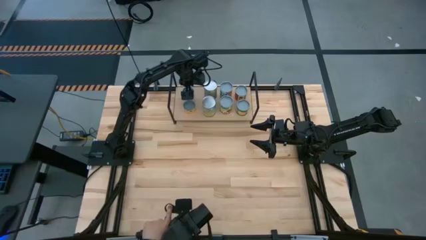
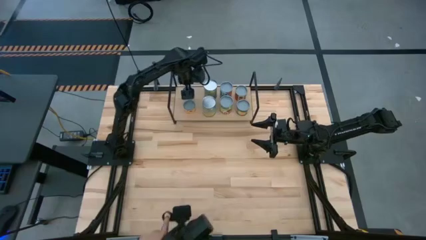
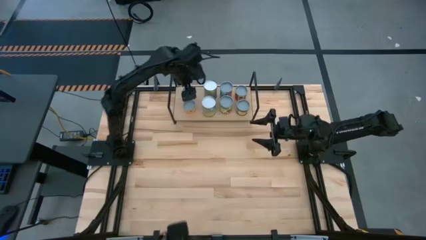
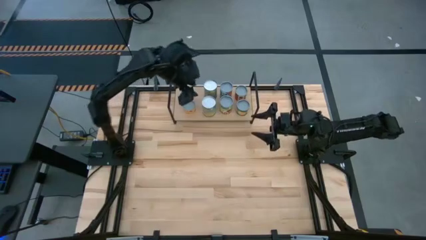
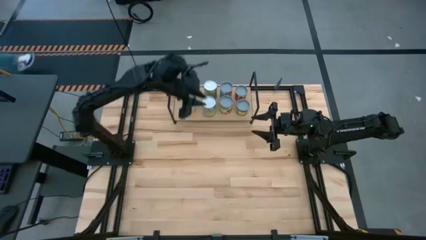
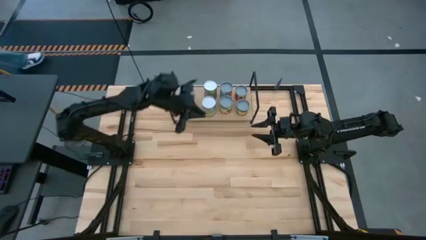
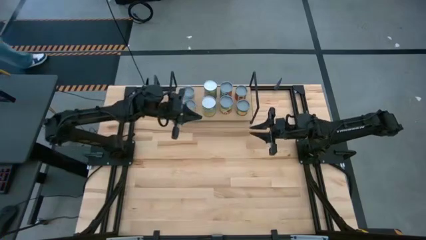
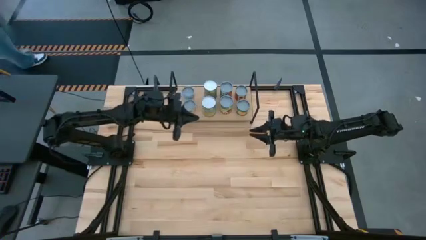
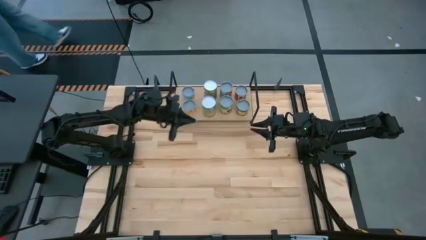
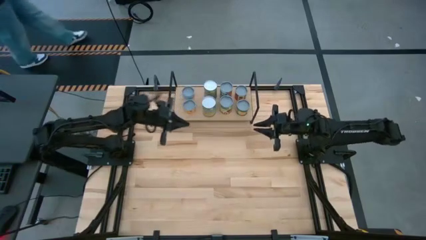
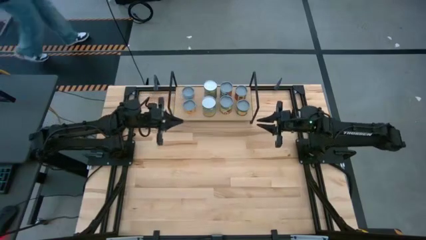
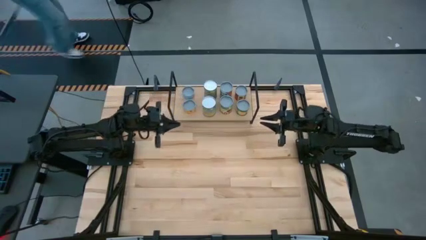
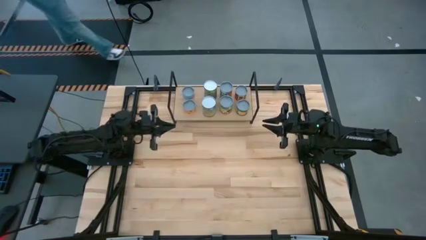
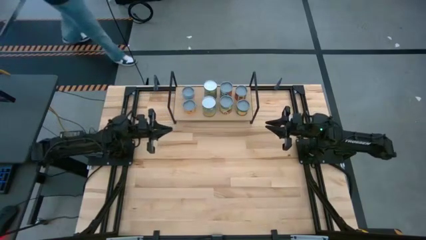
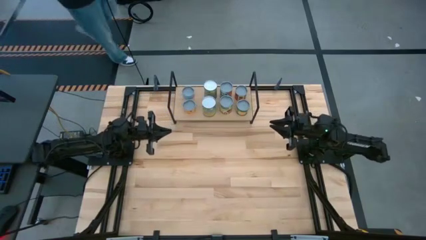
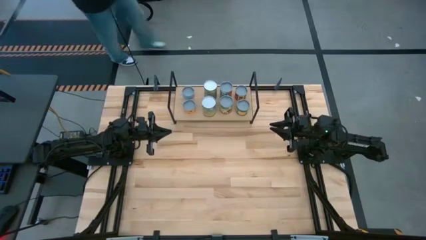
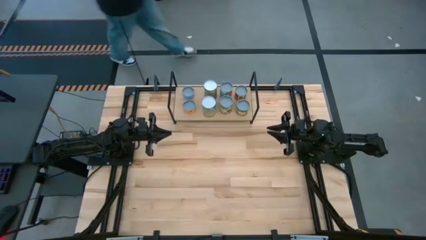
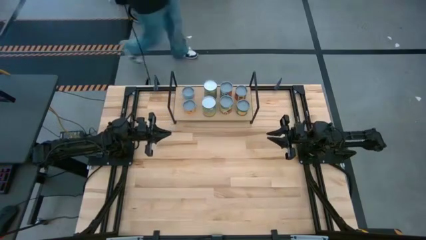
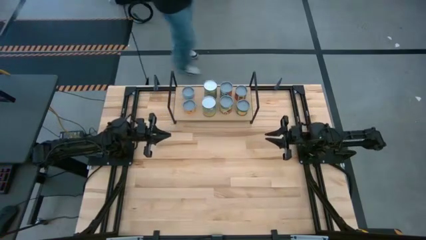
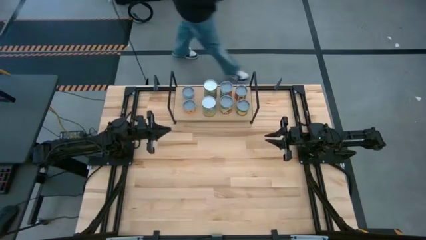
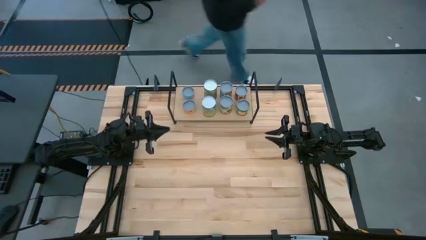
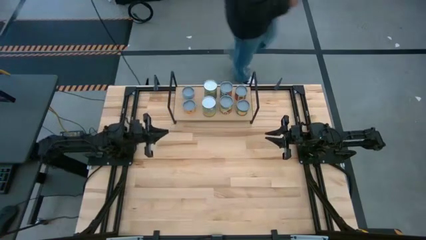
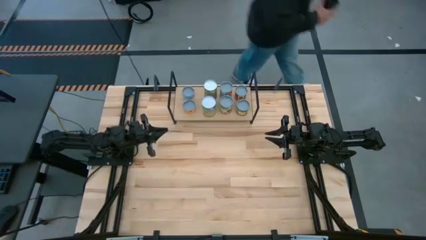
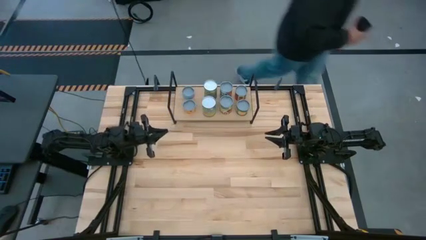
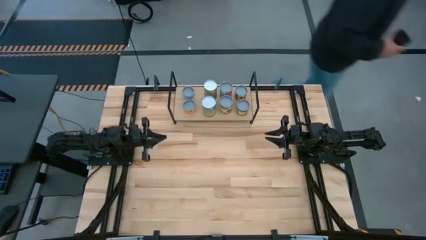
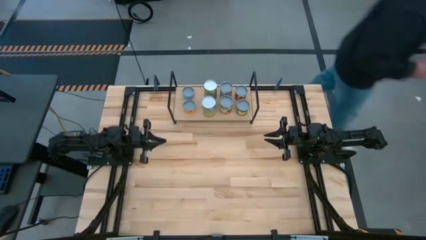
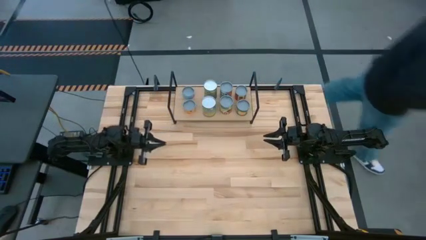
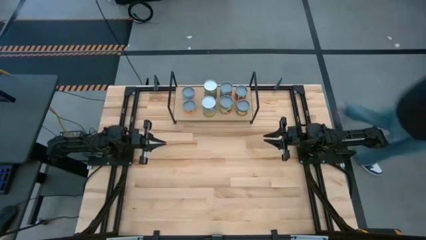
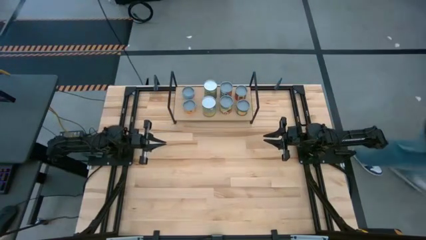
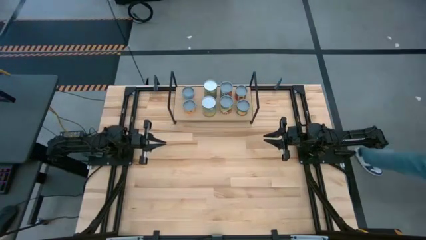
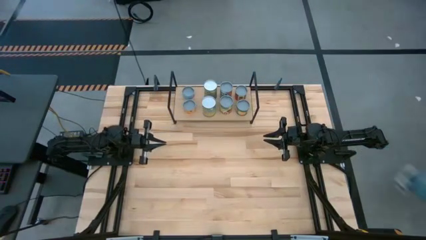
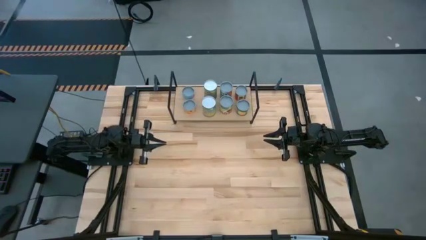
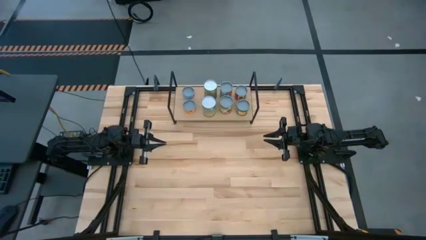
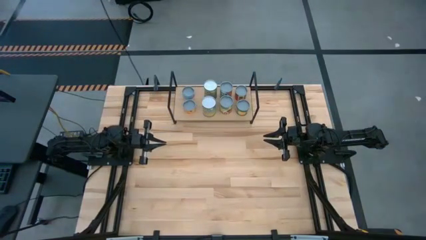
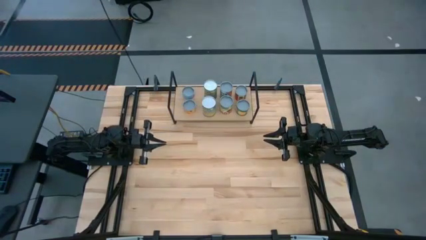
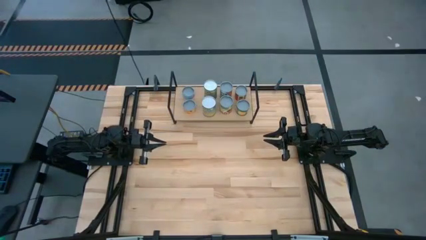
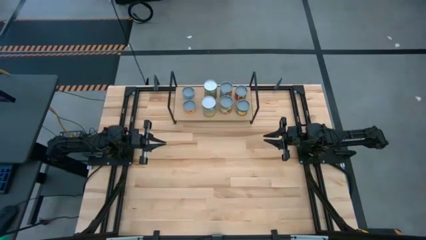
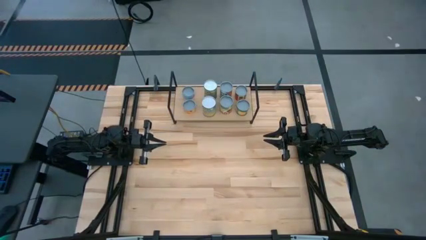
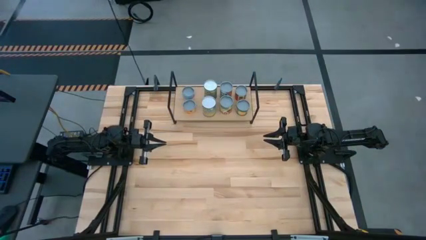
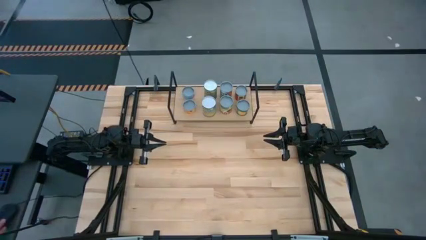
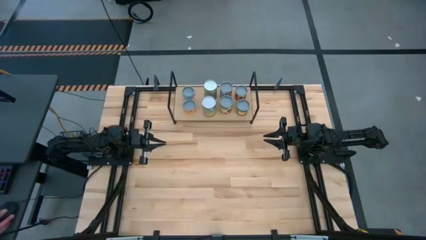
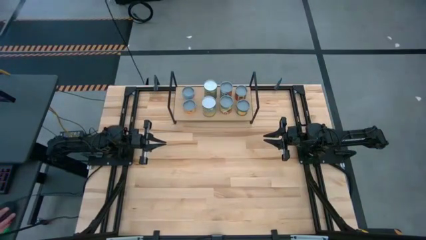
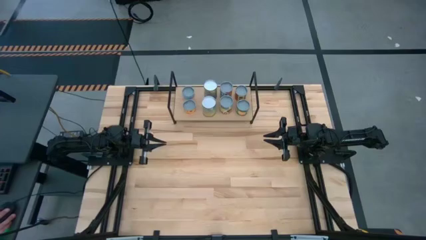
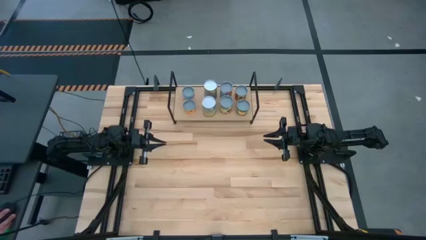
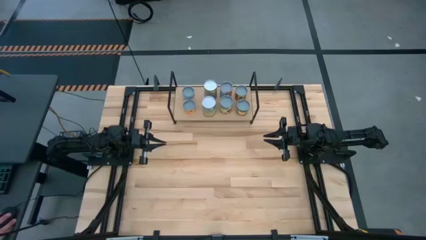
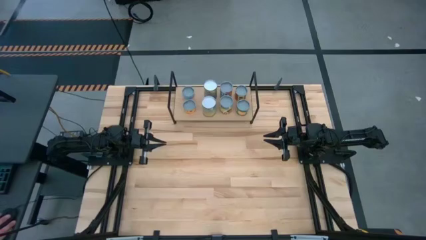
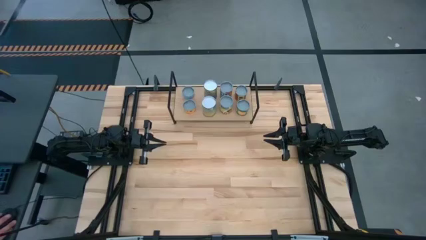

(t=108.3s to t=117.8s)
Task: Pick and place cans onto a shelf
Return to Home Position

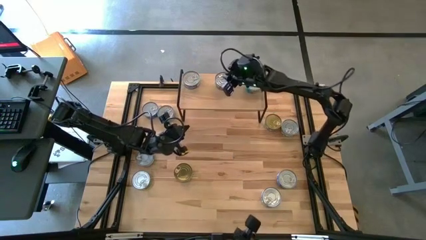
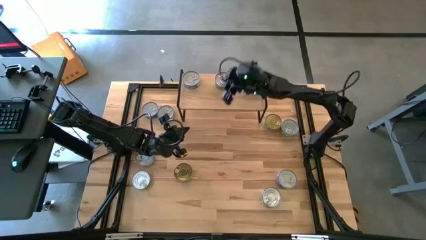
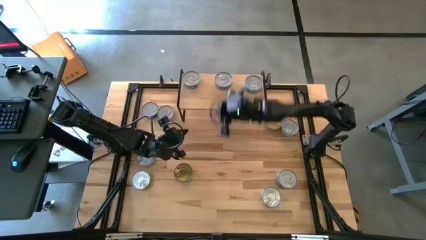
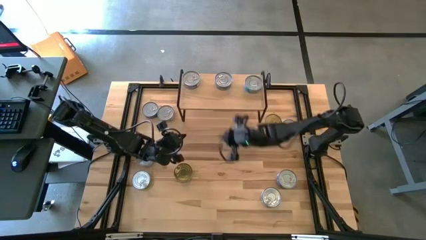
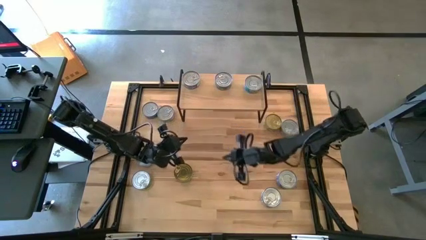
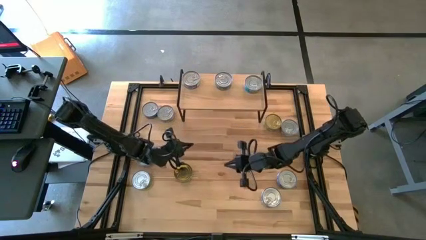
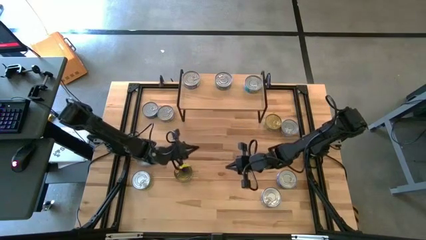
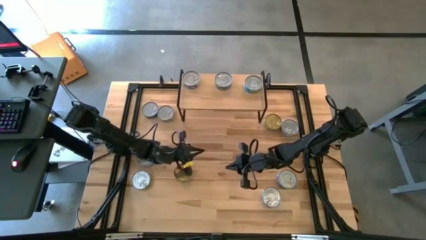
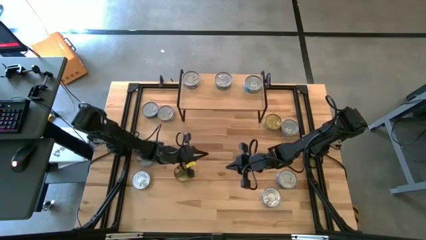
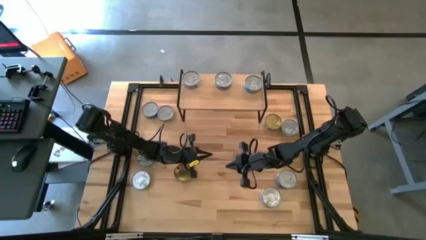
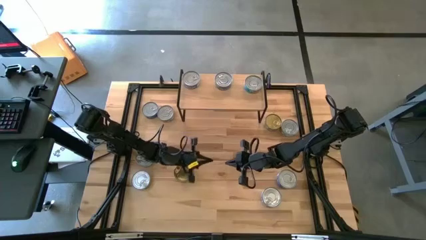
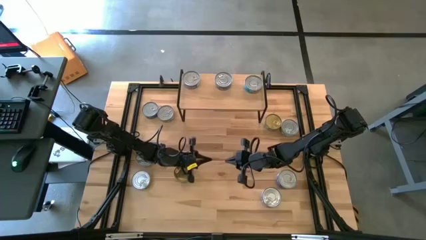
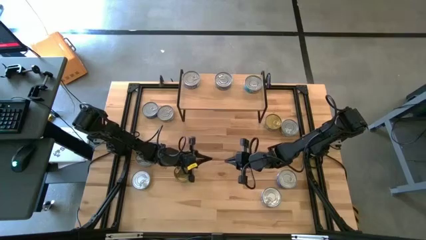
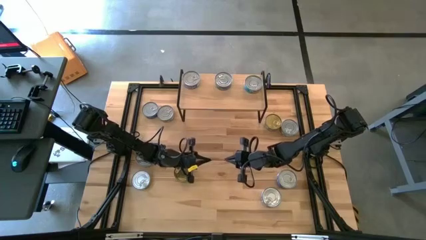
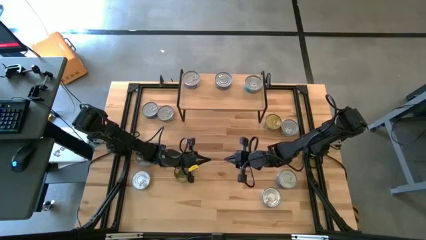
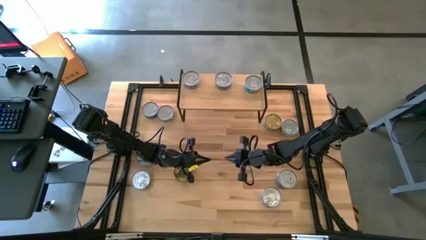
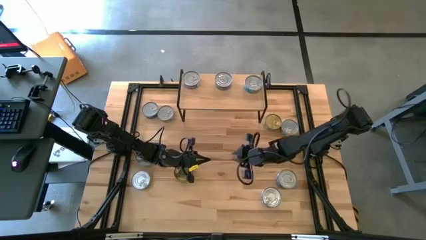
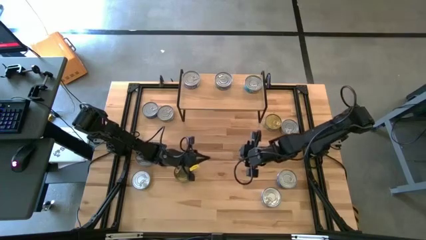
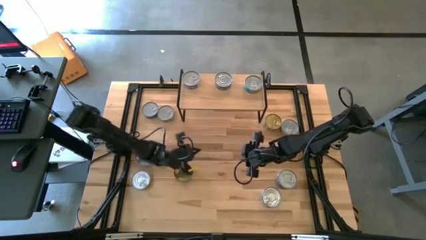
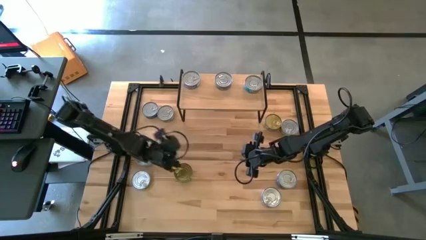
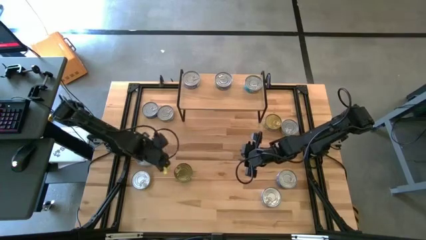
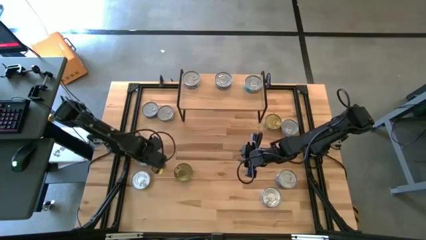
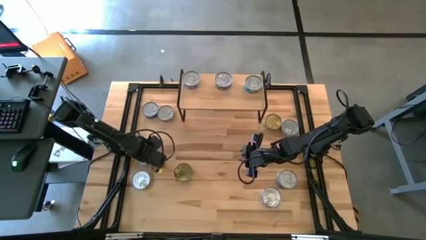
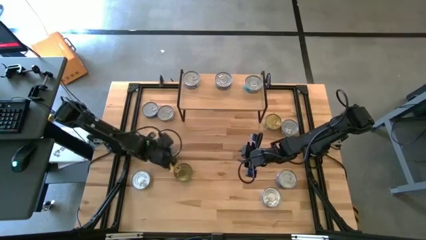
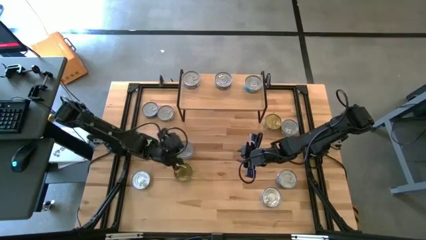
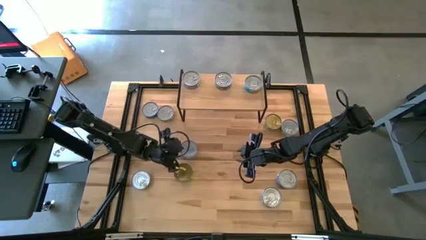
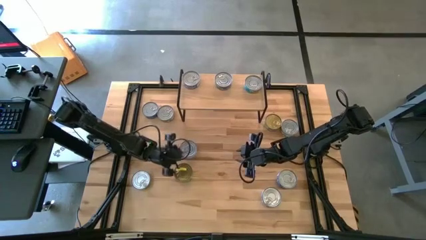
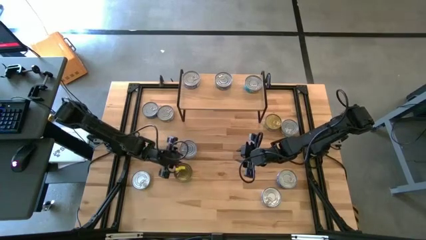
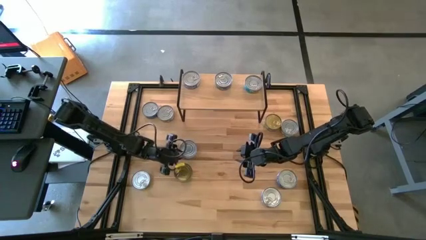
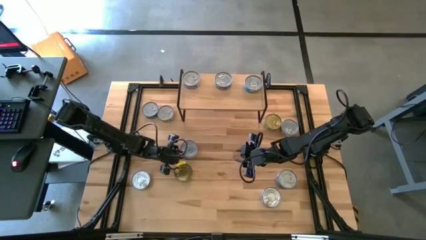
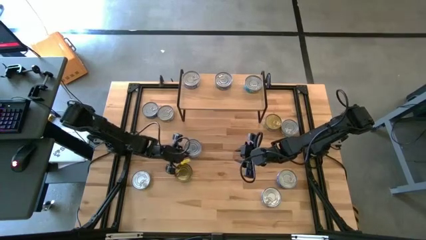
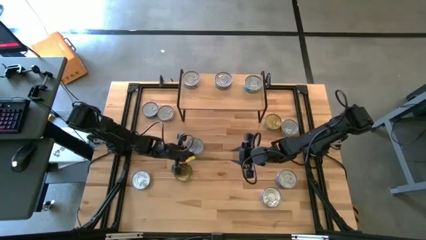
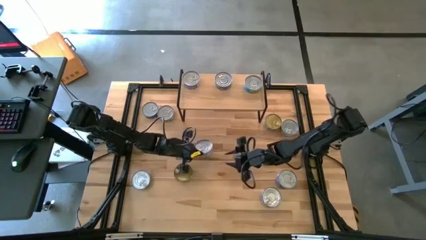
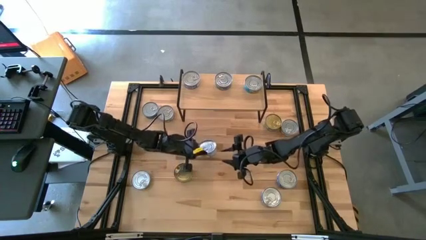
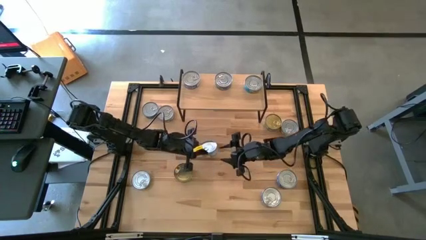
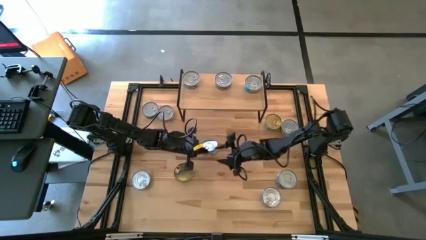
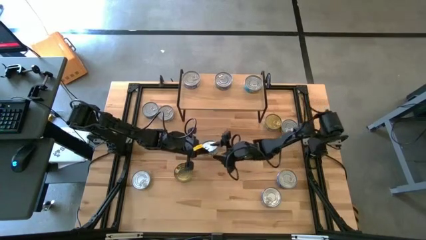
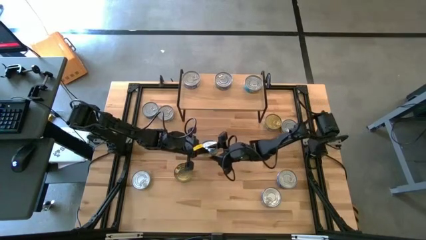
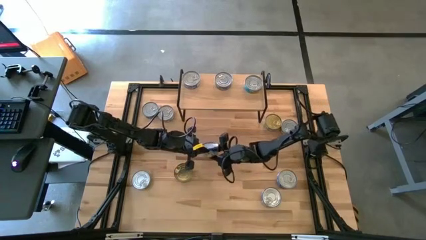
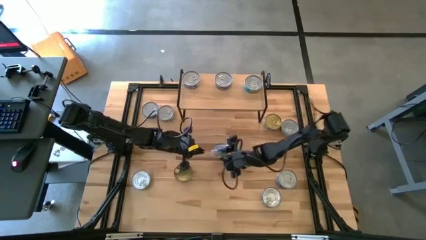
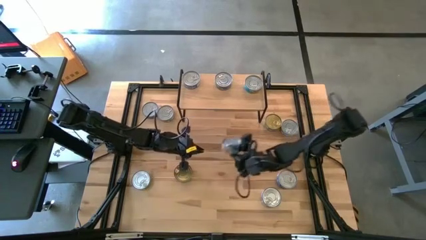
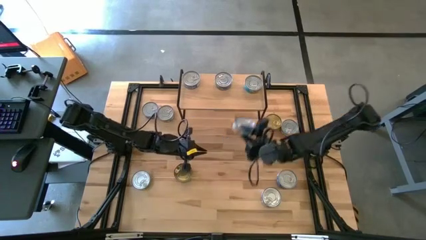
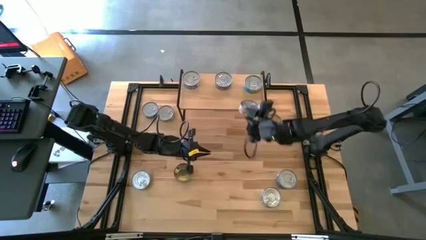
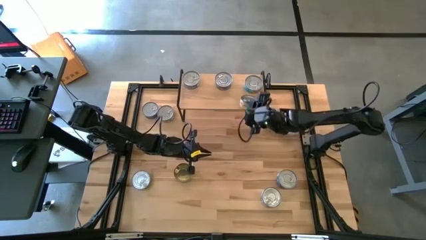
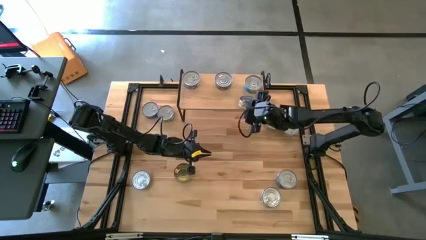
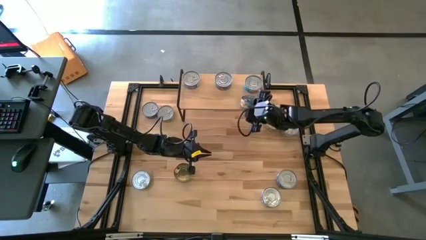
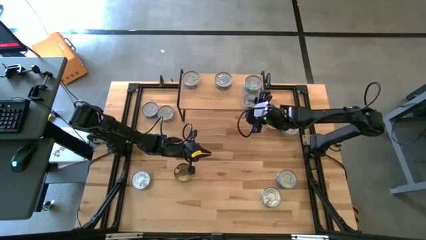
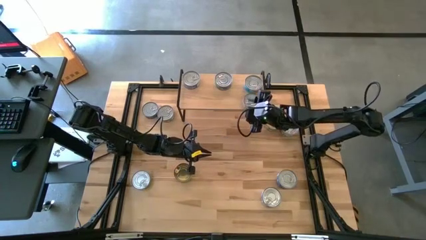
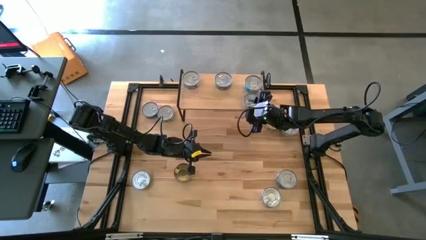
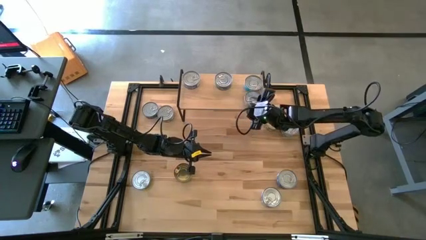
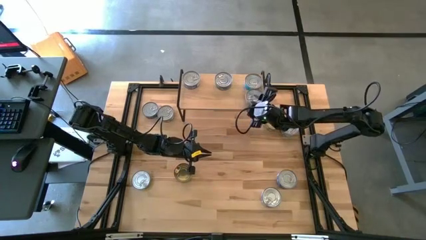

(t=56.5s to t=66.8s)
Task: Stack canned seafood by type on shelf
Put the yellow tuna can on the shelf aligned with the other yellow tuna can
